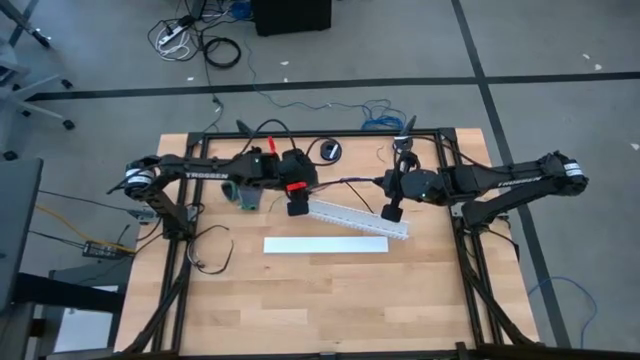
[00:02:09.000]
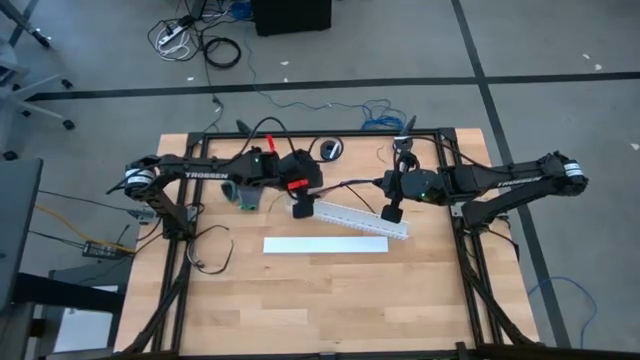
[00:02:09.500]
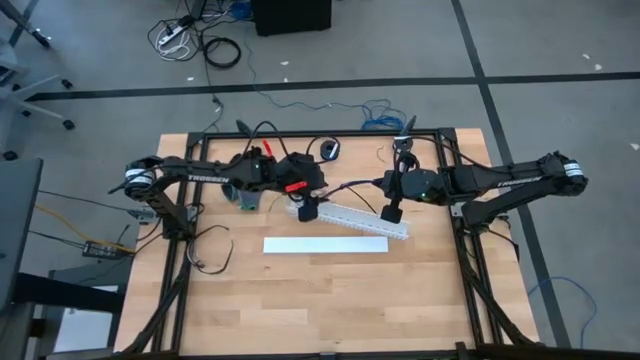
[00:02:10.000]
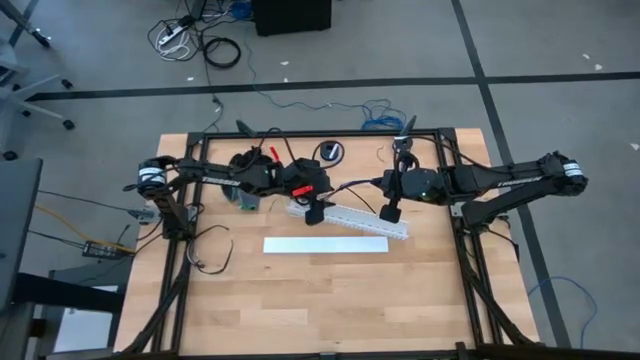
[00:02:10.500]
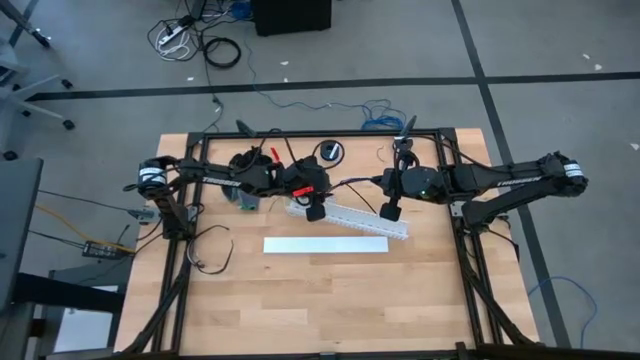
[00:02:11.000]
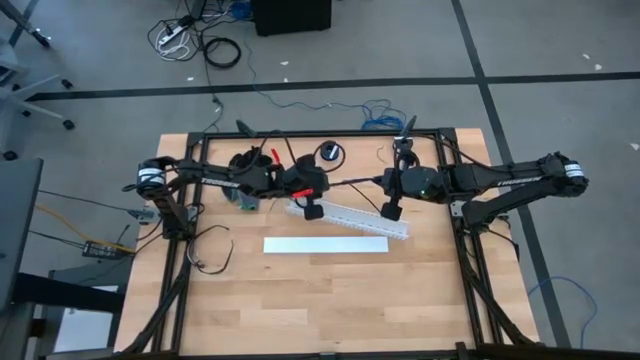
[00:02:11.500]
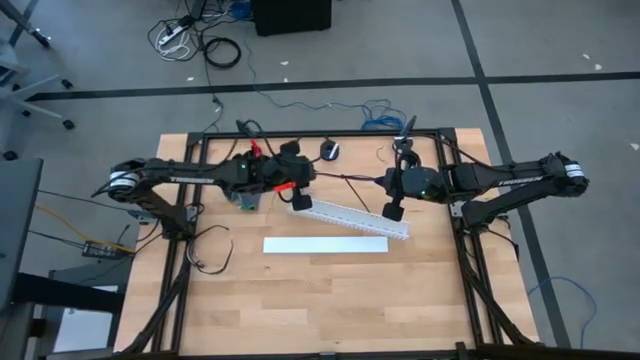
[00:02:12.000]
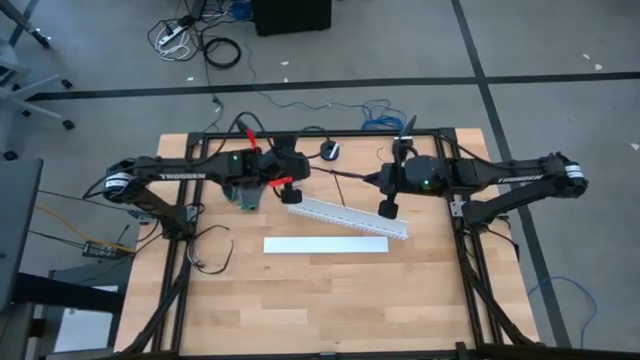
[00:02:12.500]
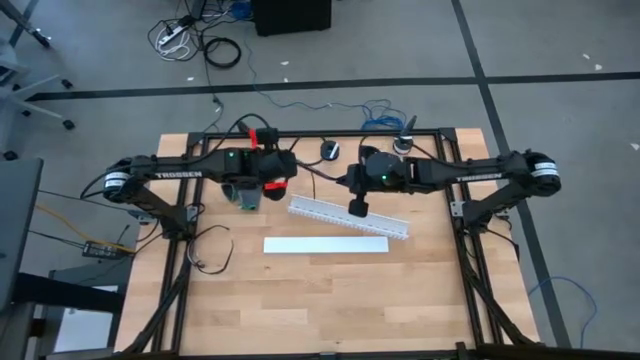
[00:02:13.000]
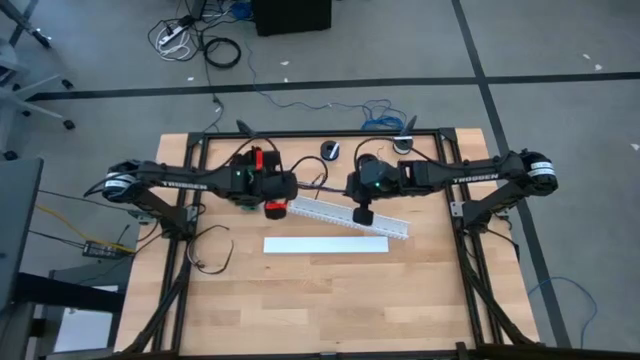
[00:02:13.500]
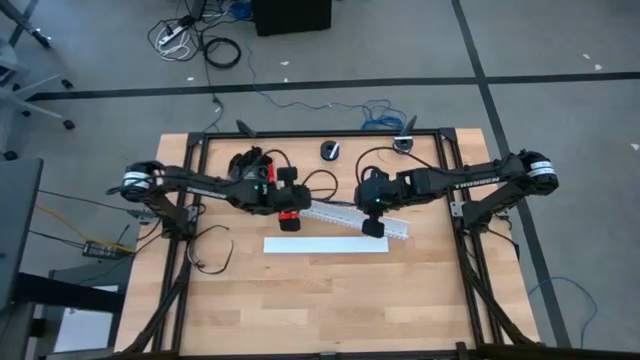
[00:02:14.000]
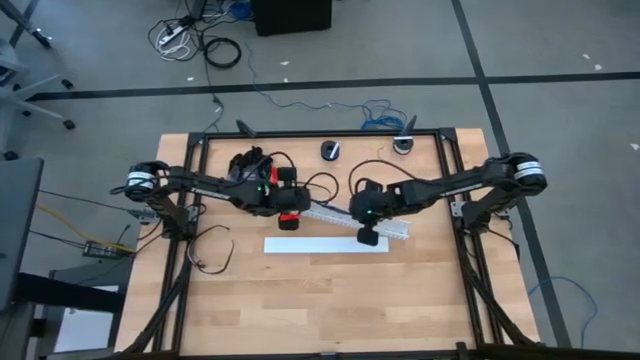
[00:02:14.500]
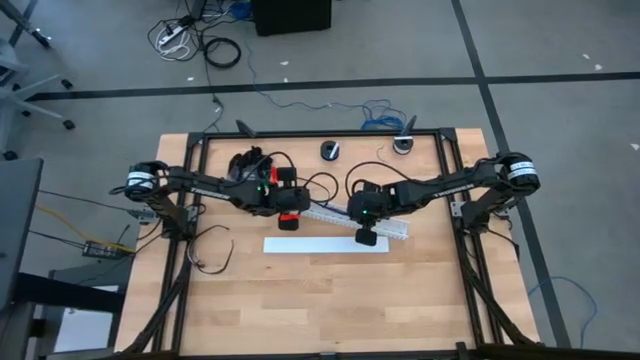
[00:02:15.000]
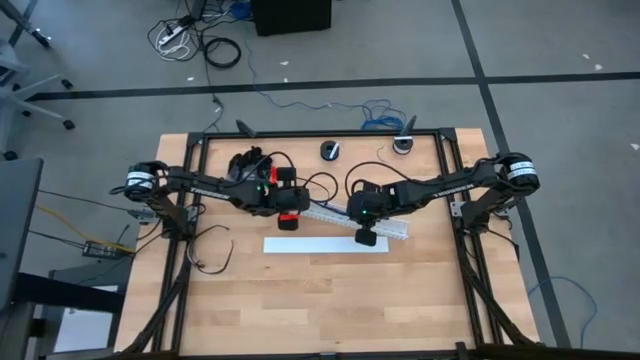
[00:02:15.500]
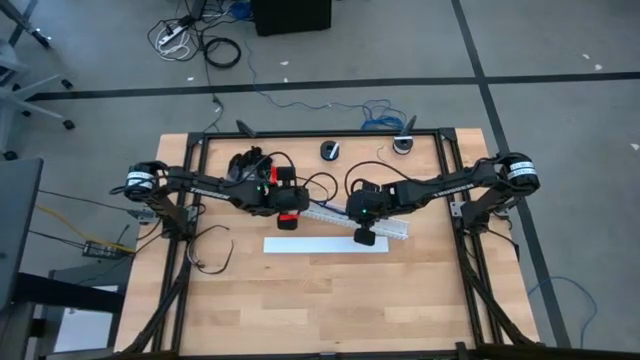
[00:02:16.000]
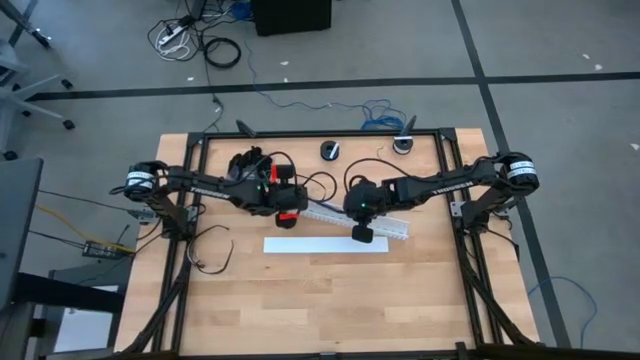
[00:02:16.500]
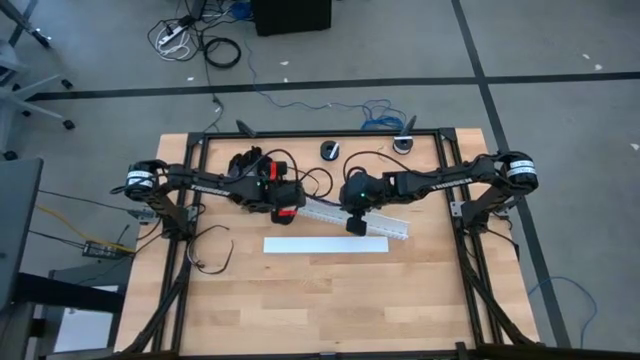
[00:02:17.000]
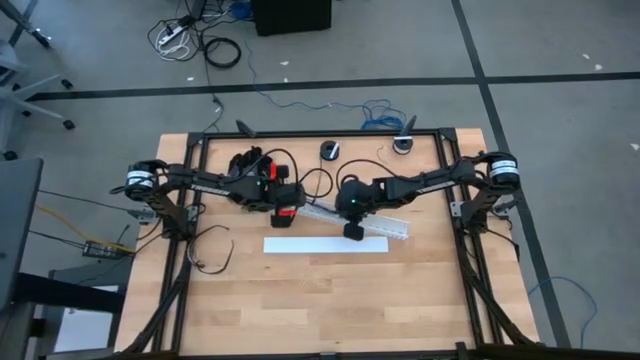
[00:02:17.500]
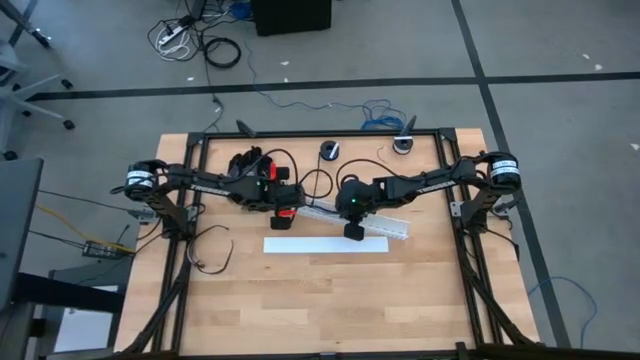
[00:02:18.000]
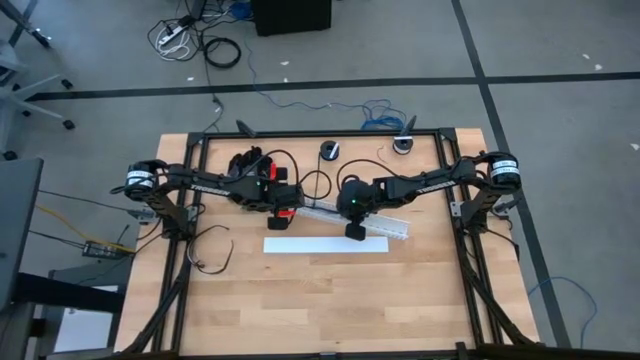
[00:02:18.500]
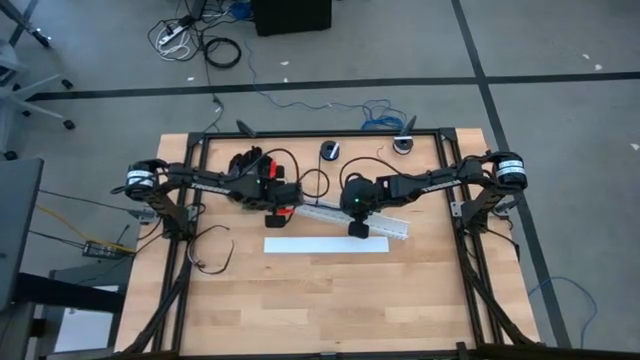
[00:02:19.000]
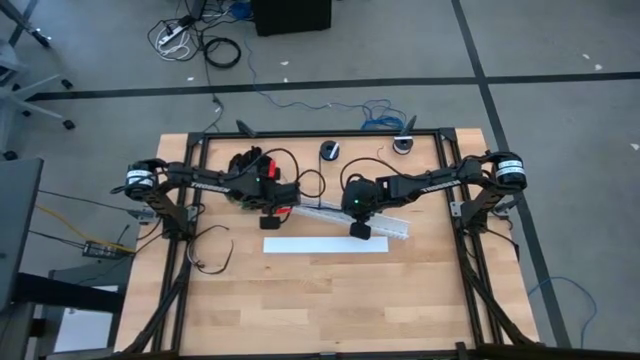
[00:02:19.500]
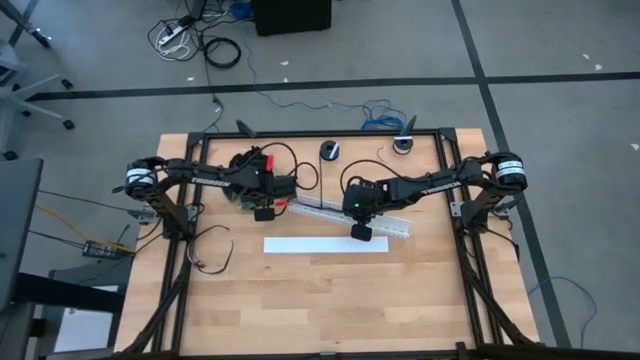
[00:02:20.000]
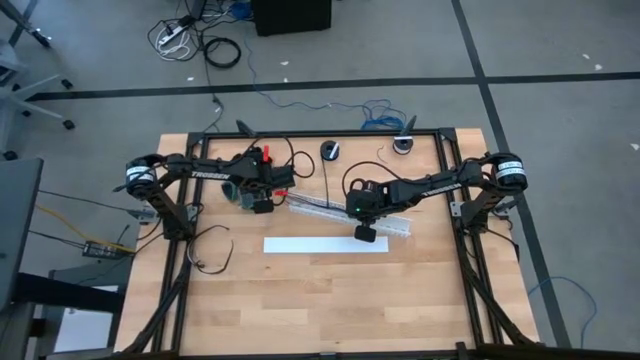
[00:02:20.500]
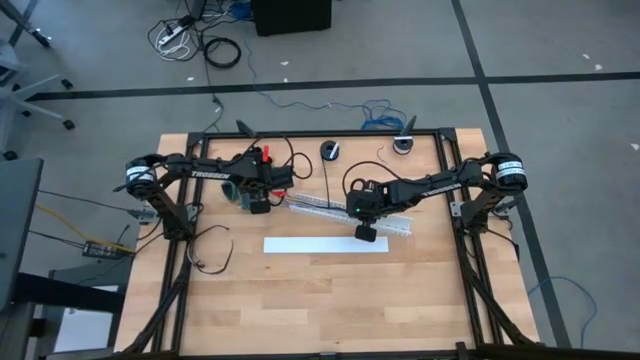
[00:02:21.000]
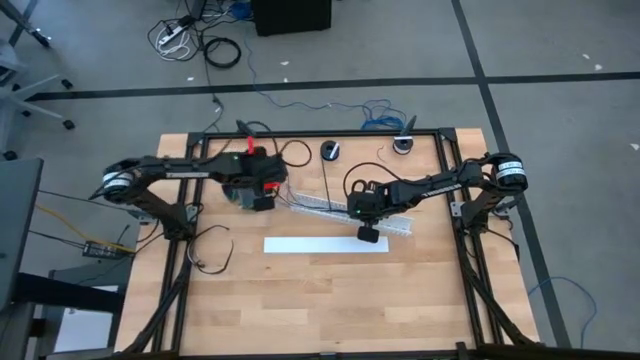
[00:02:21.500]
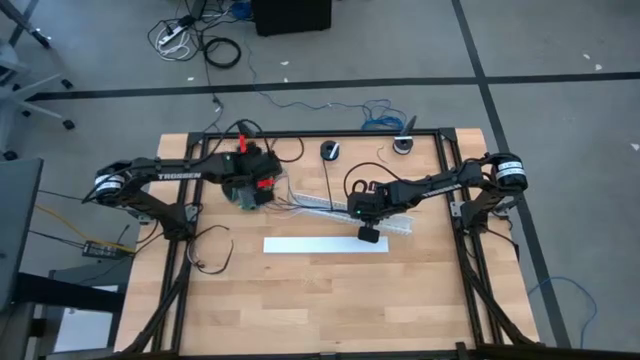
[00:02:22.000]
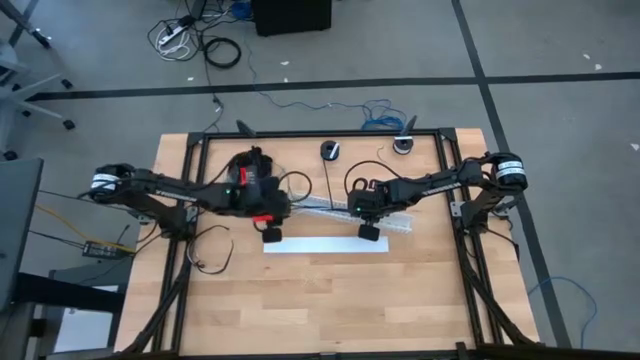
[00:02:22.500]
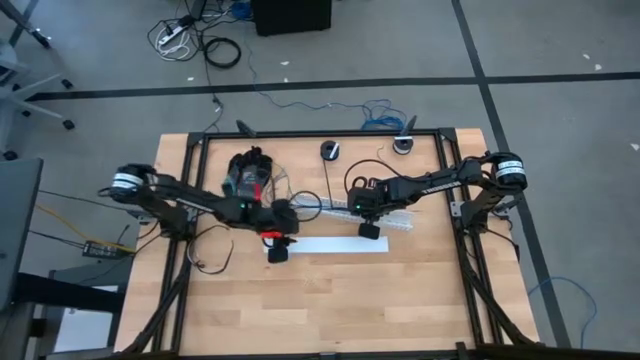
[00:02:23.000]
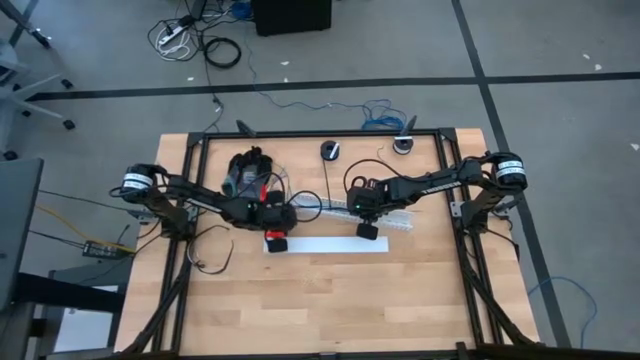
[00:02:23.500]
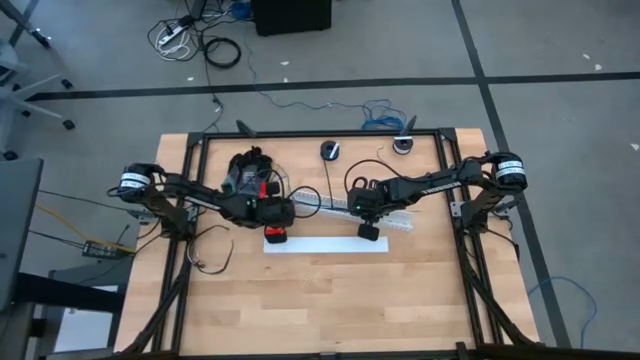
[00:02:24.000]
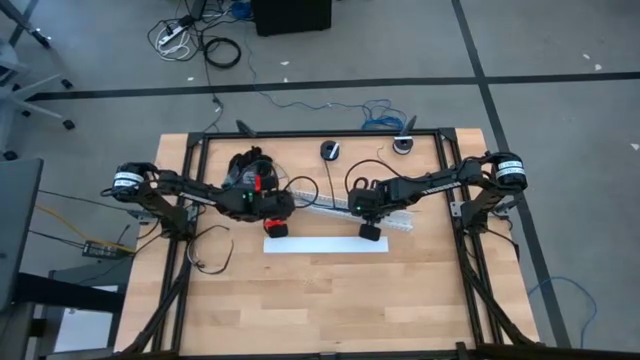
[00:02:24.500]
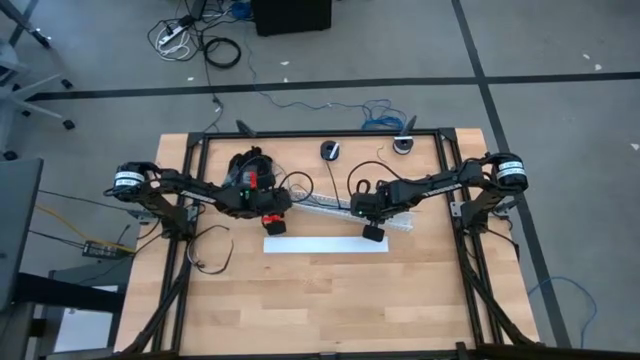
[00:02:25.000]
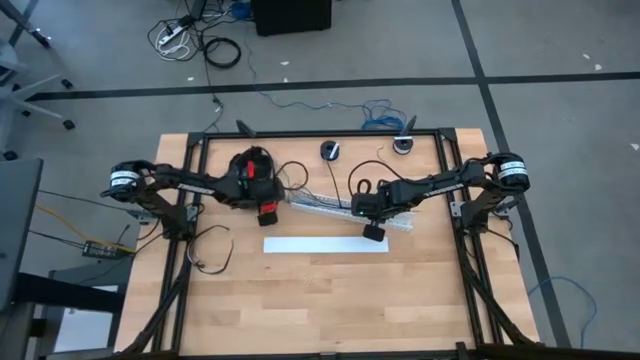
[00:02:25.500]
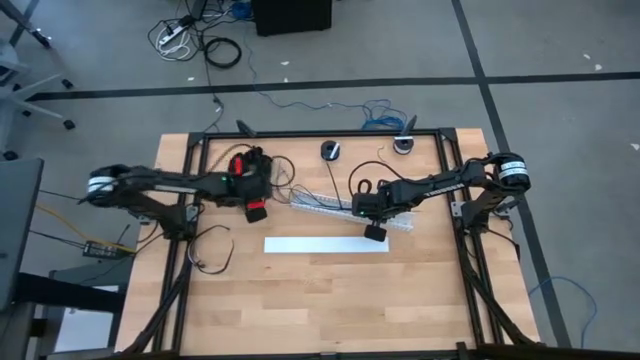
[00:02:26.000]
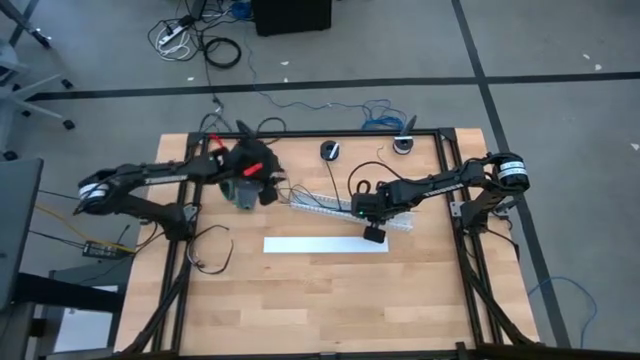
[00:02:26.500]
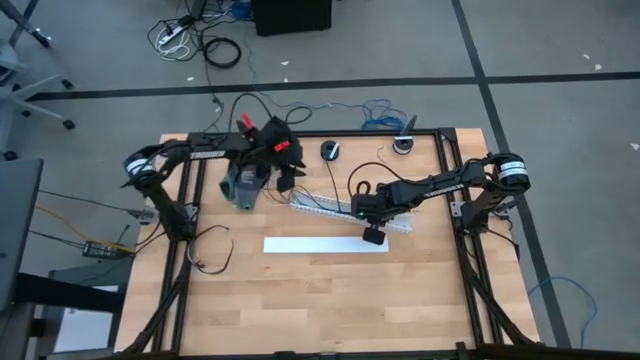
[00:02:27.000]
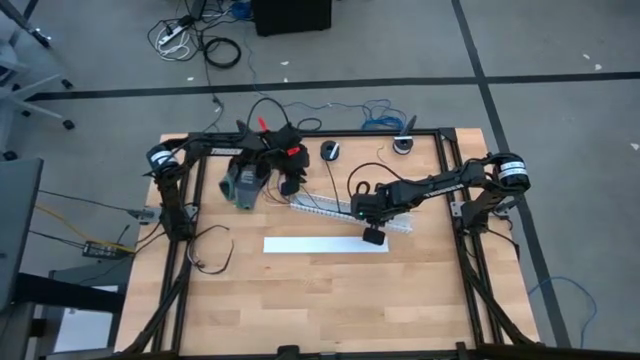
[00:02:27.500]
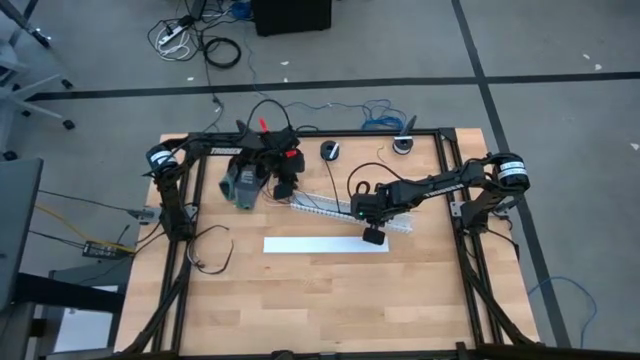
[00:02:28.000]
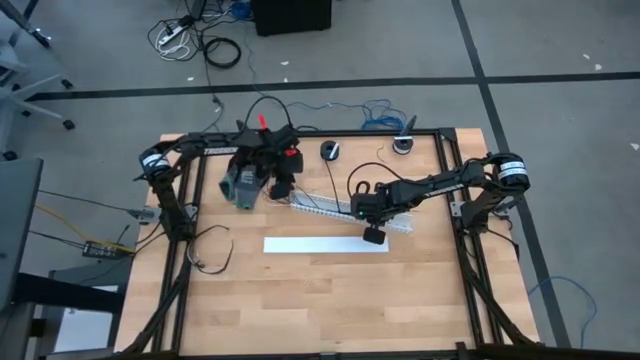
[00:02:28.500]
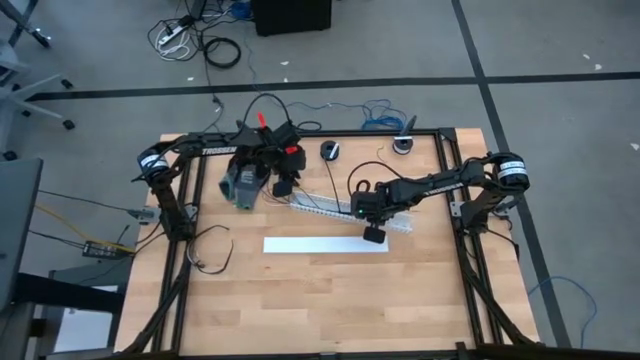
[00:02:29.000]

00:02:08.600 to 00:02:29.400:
Task: Ziptie cables
Put the ziptied cables into the white cable duct
